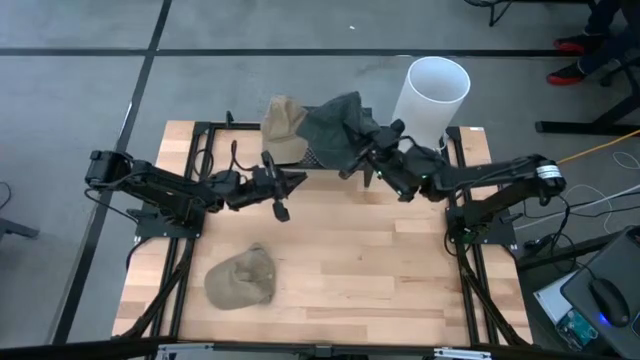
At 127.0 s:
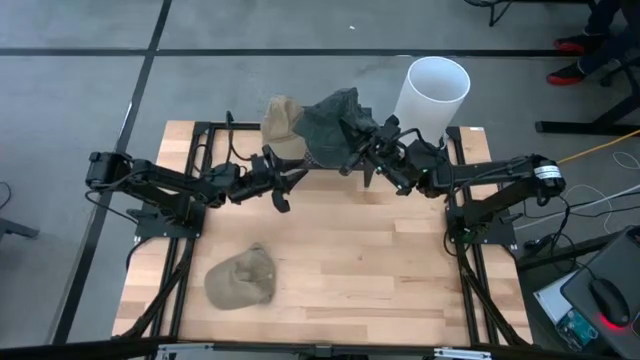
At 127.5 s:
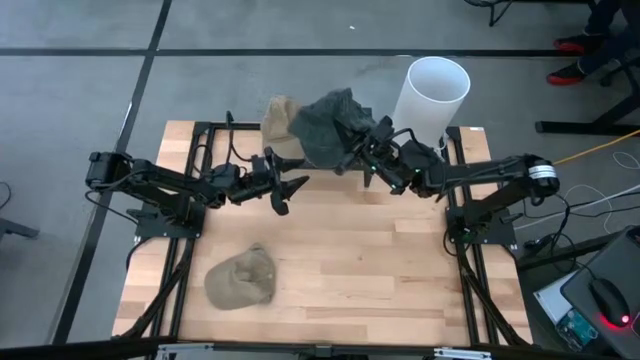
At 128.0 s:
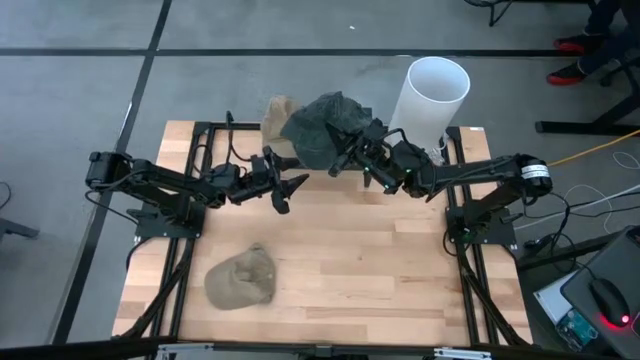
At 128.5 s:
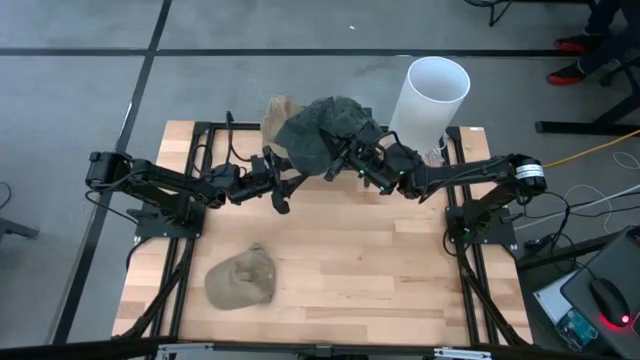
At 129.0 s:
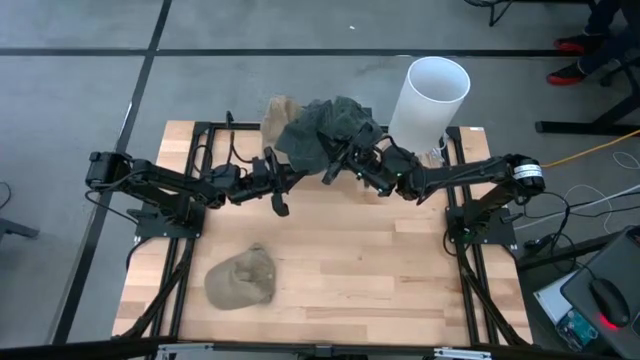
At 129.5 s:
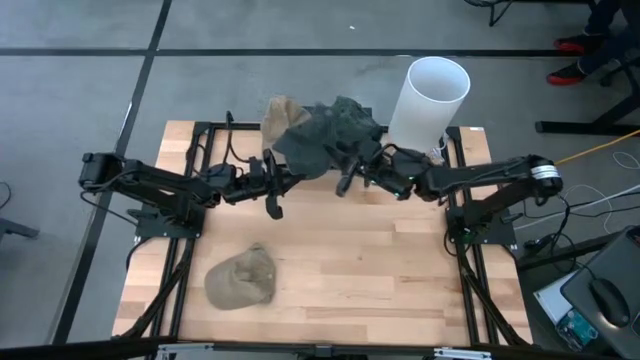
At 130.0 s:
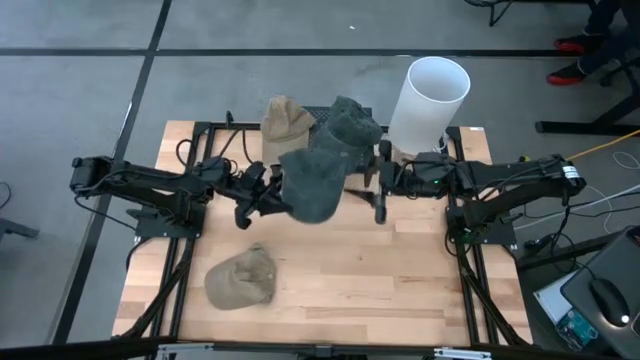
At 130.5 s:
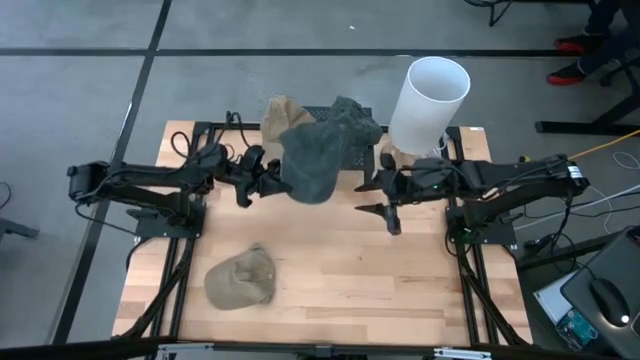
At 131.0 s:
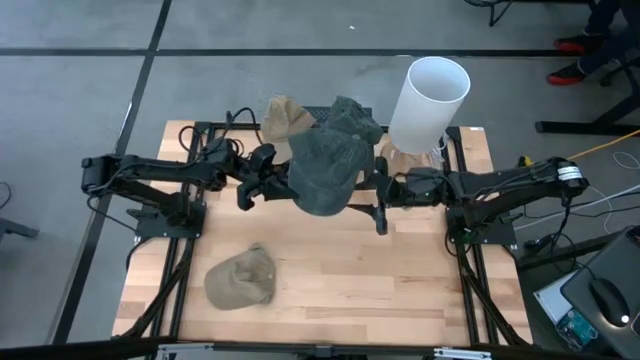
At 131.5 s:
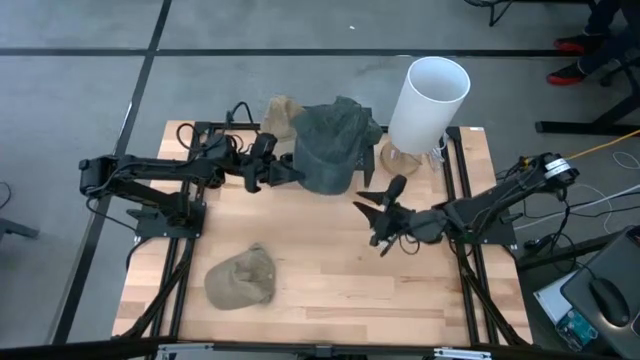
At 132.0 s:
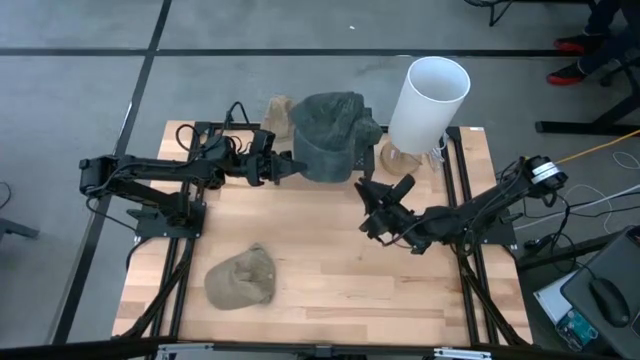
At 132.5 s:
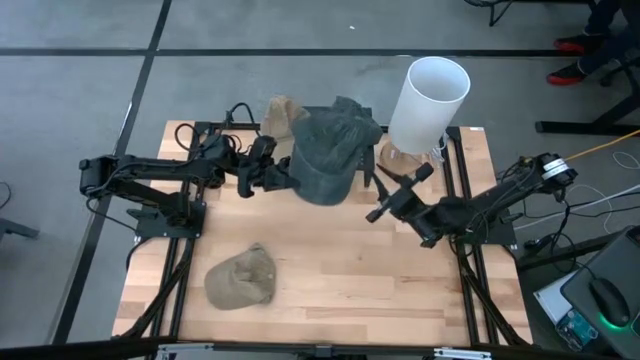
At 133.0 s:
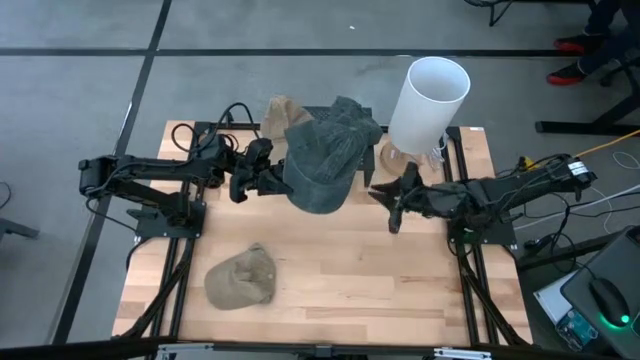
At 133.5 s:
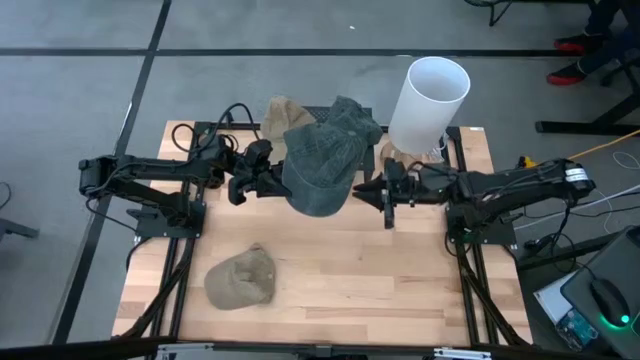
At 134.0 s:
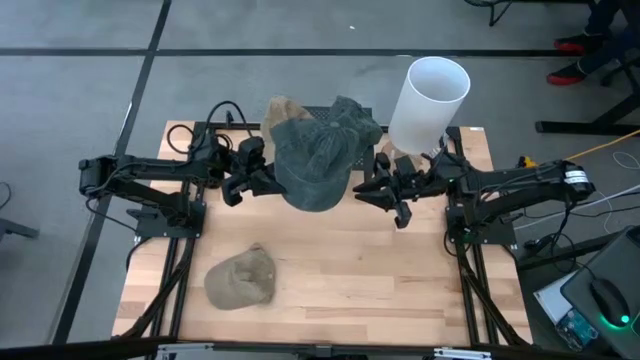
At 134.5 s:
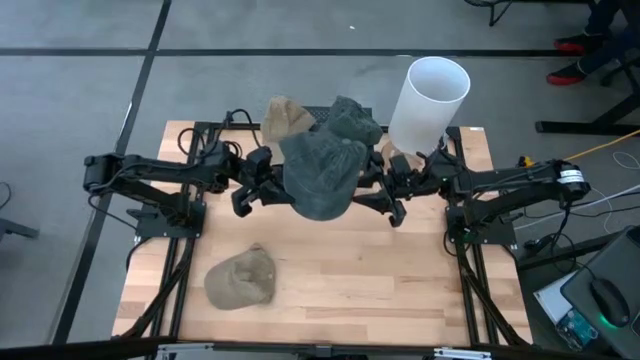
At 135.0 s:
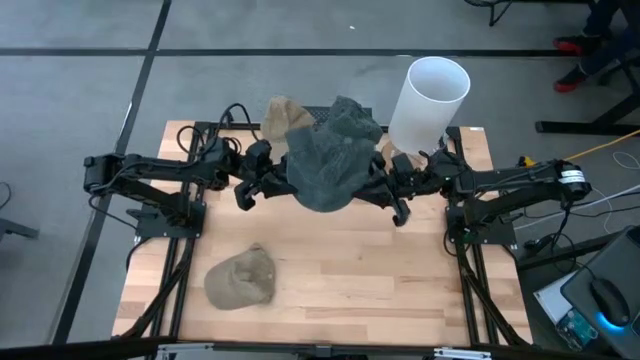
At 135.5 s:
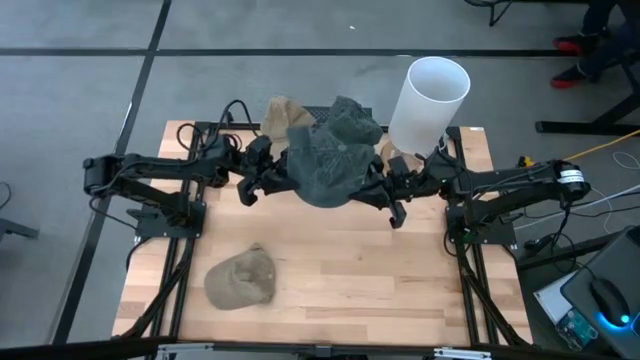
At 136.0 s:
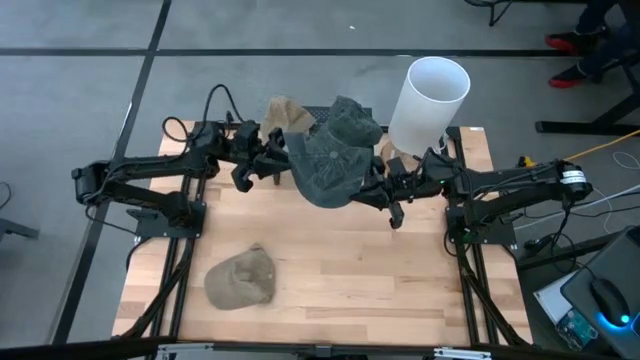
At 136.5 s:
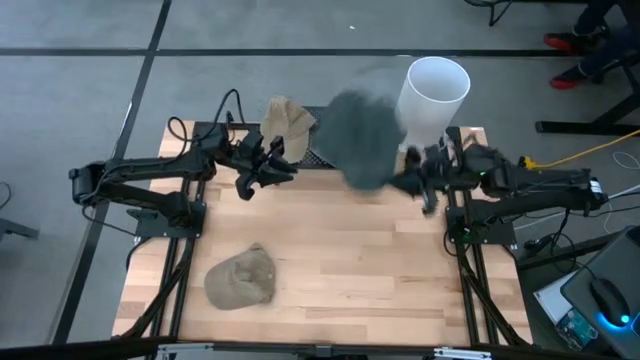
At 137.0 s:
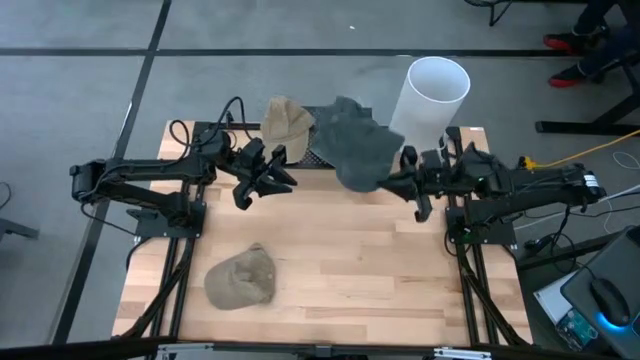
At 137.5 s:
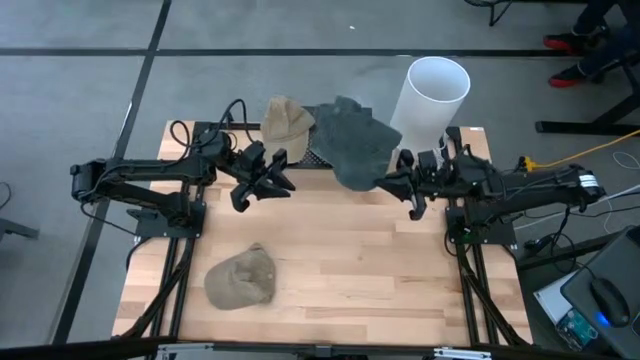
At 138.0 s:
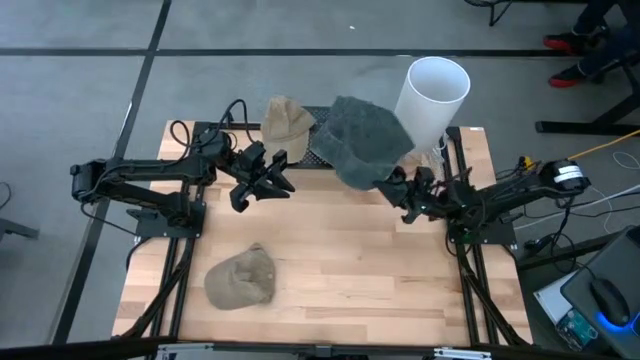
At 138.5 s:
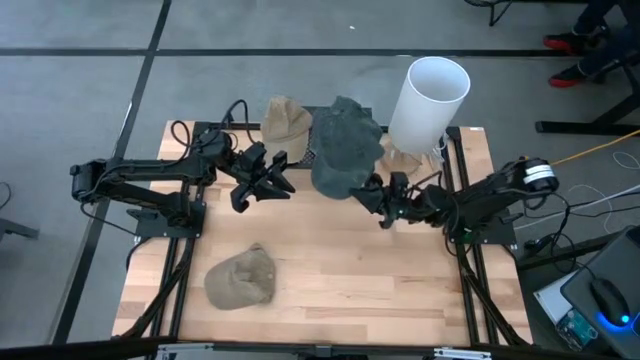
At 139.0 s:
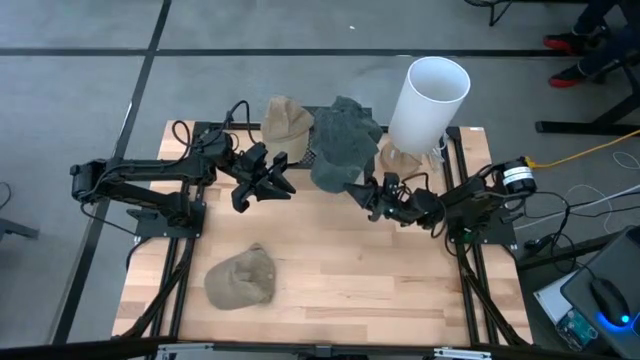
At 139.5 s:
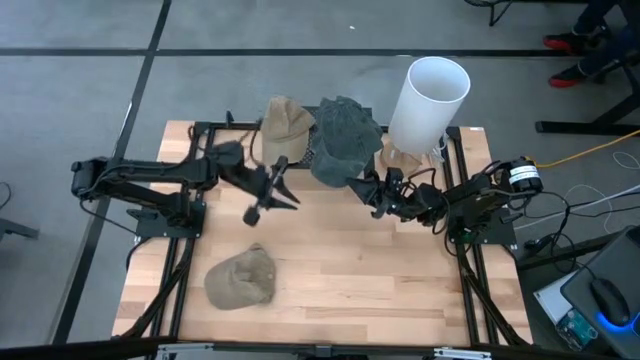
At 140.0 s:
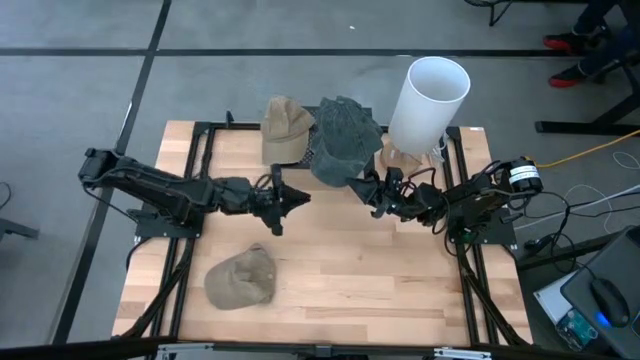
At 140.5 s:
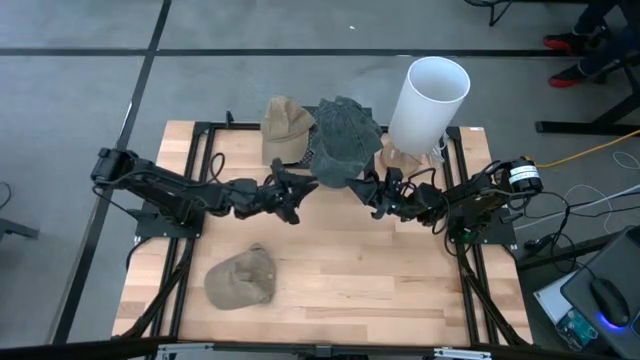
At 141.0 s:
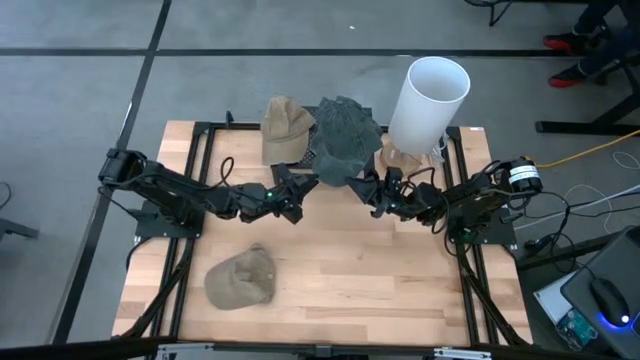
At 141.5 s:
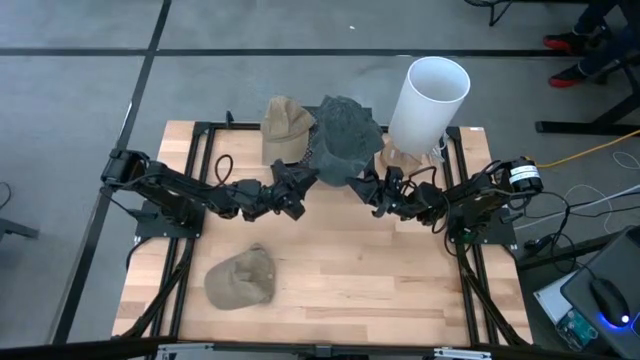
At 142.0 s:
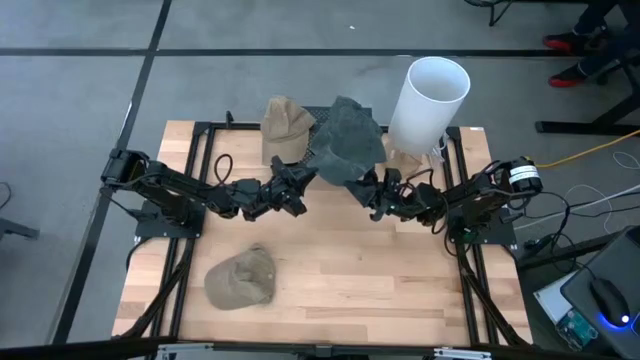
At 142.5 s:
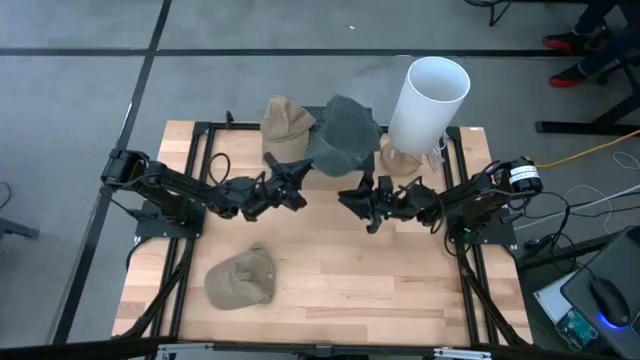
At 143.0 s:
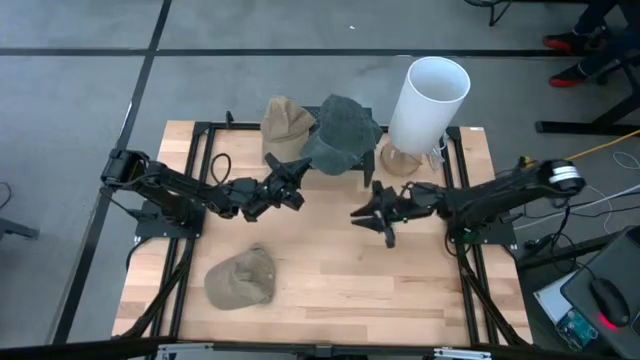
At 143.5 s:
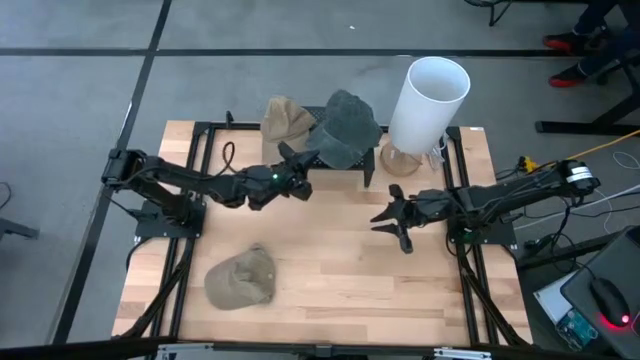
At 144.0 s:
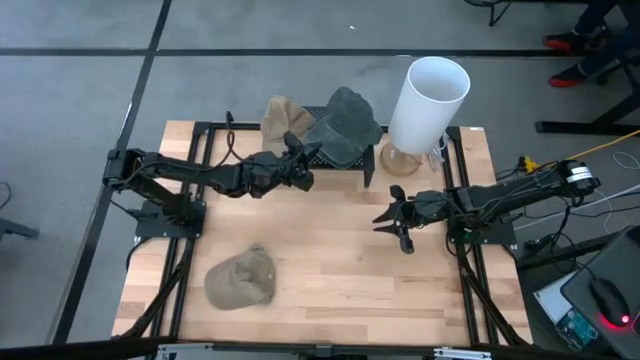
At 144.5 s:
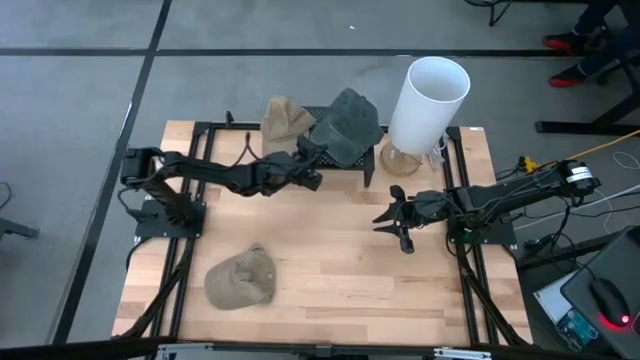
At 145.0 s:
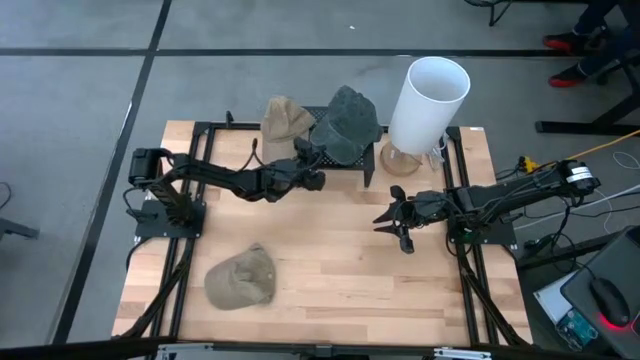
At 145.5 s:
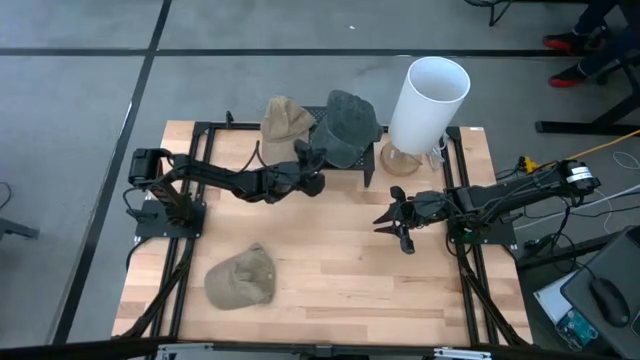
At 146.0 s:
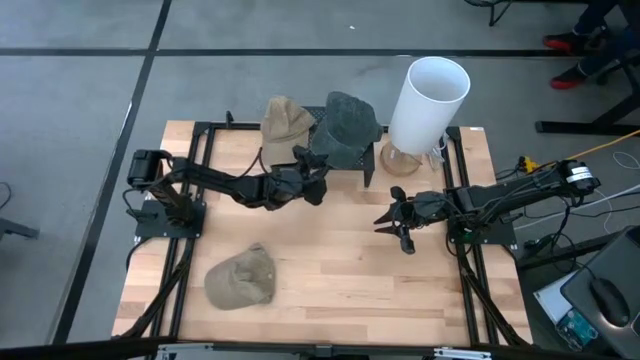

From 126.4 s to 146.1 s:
Task: Pick & Place hat
Stack the dark green cap on top of the other dark green cap on the shelf

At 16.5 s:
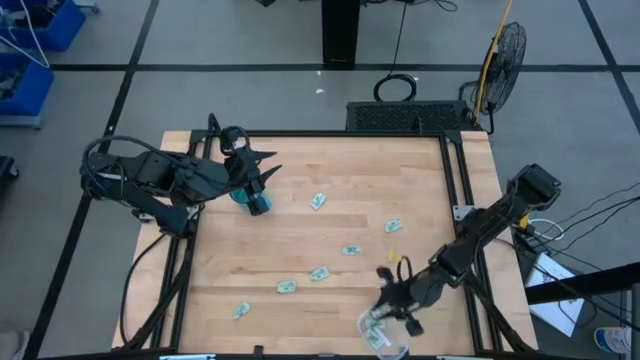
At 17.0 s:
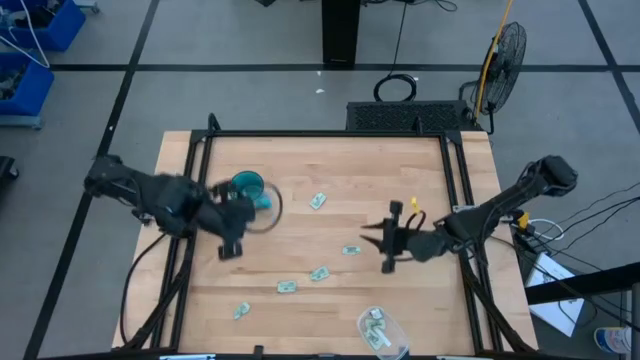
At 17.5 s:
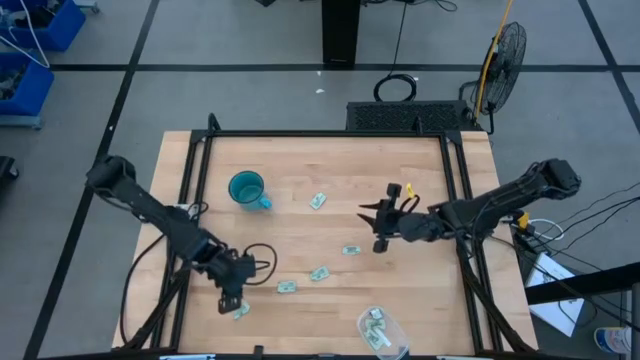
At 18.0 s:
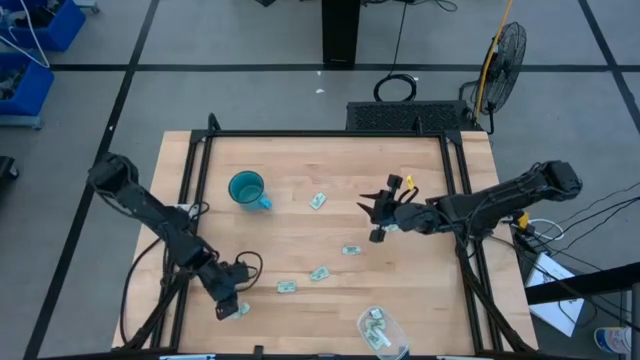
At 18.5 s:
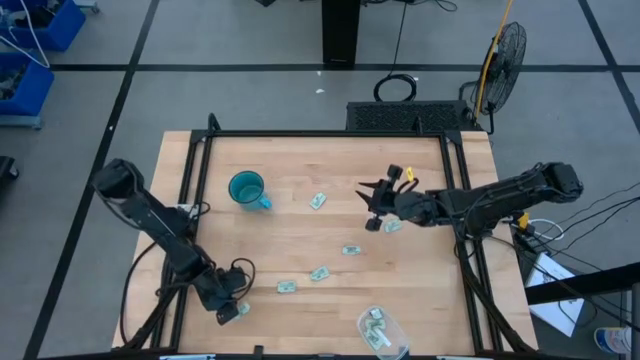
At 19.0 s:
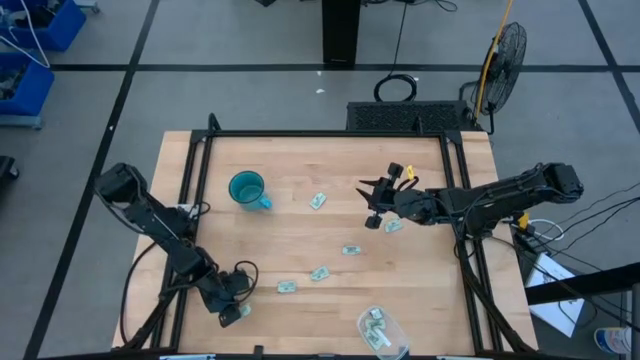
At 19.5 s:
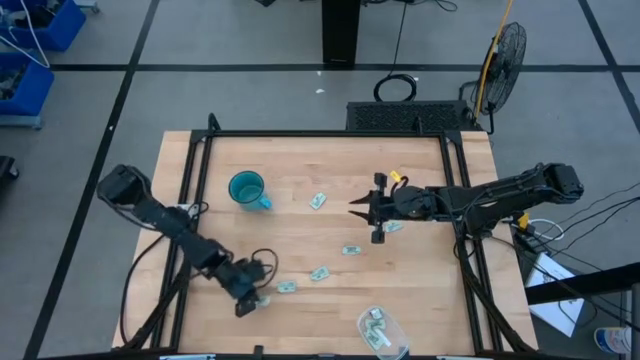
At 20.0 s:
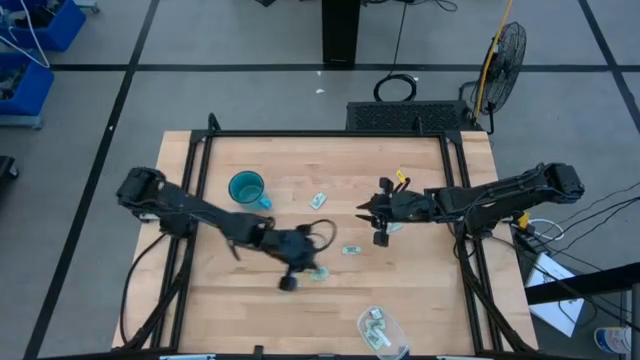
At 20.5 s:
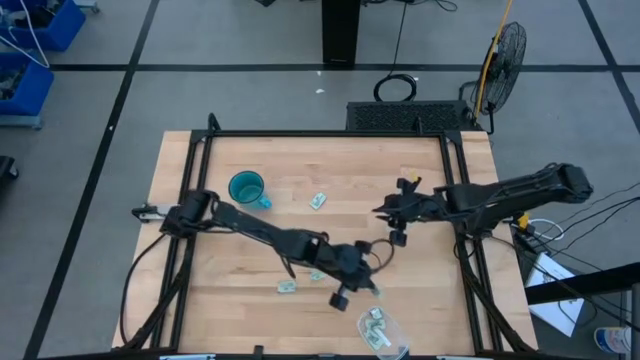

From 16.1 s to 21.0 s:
Task: Pick and place Stevia / Truvia into bins
Put the green stevia packet into the transparent container
